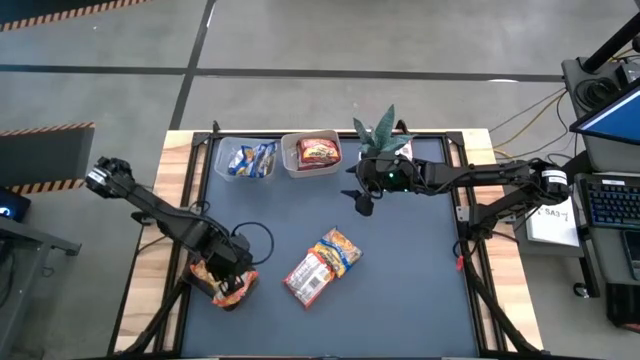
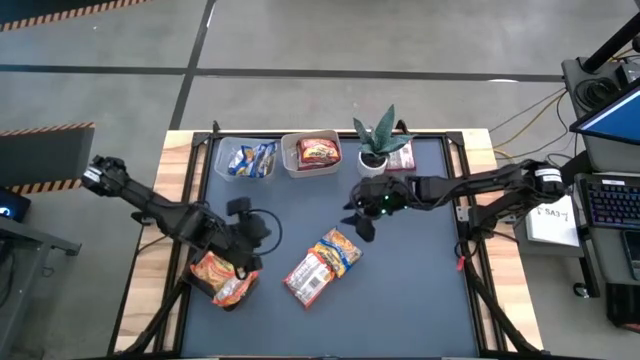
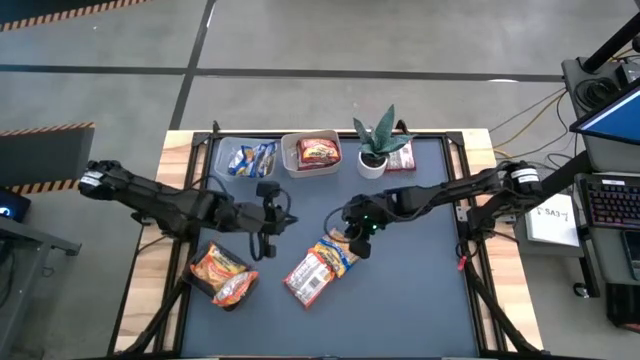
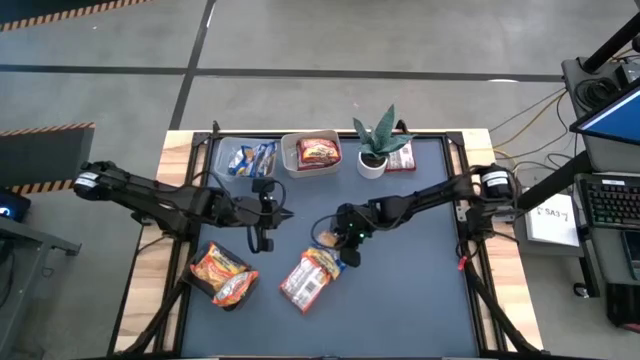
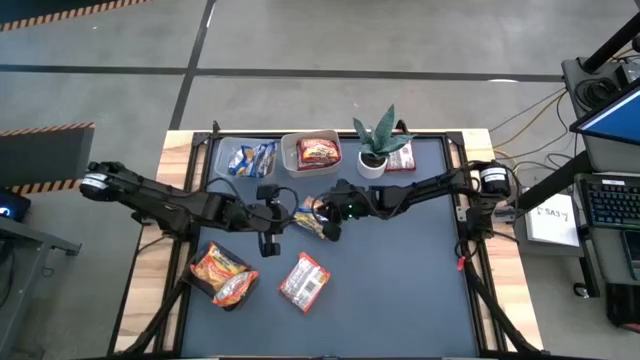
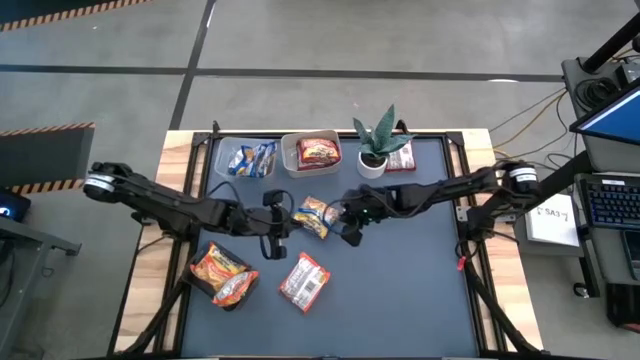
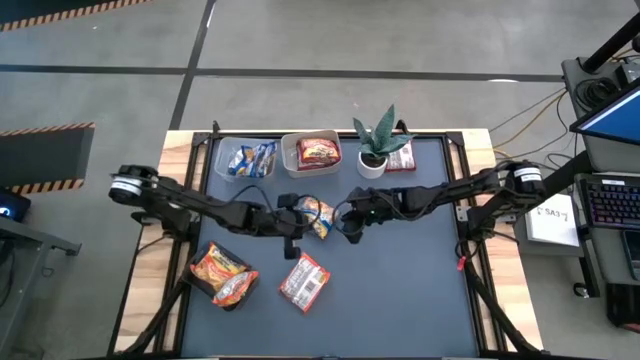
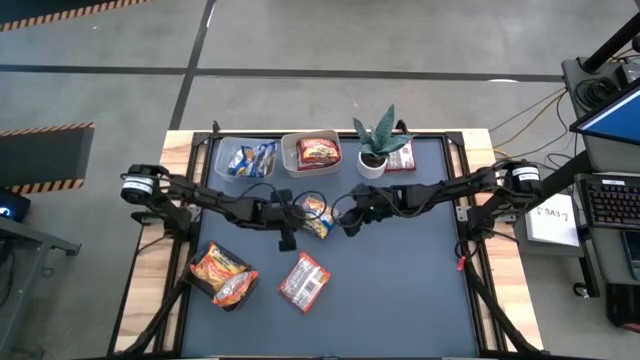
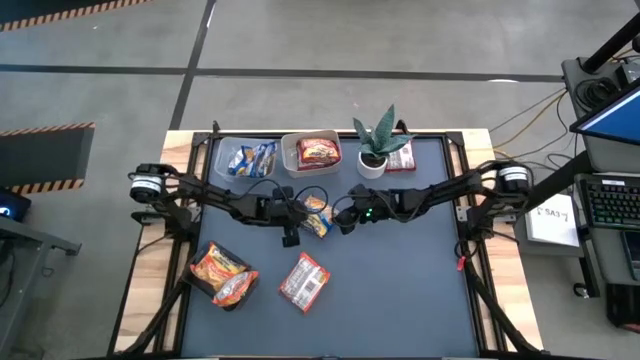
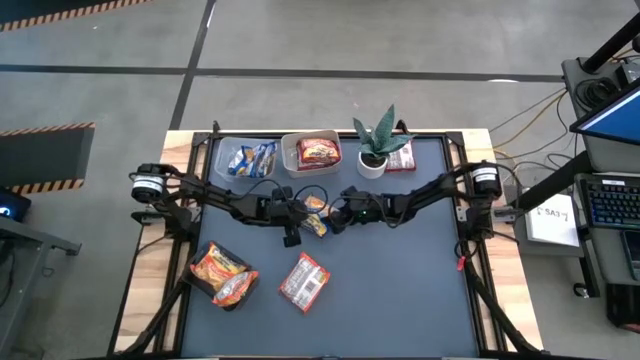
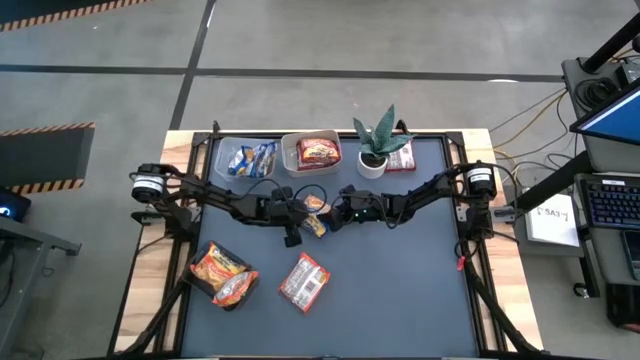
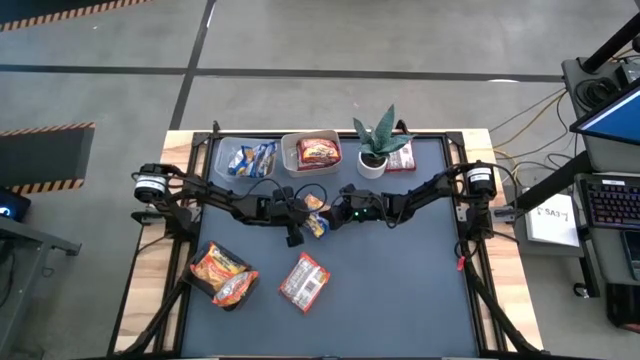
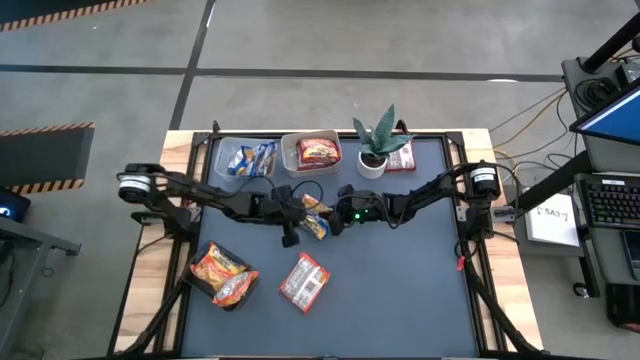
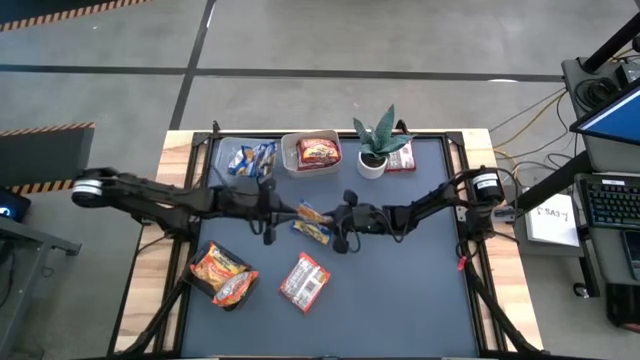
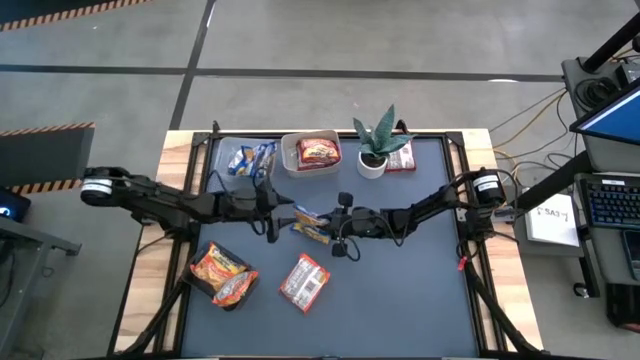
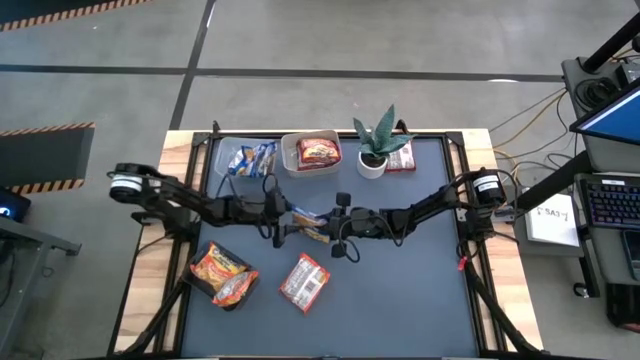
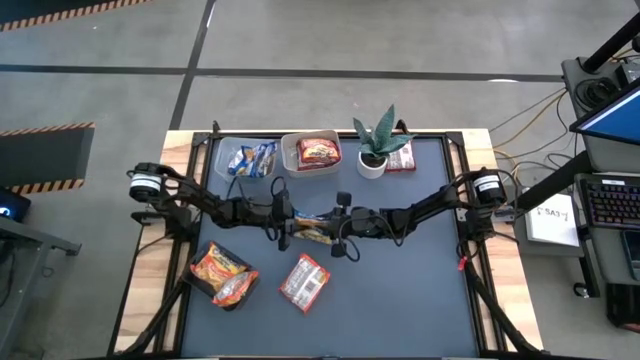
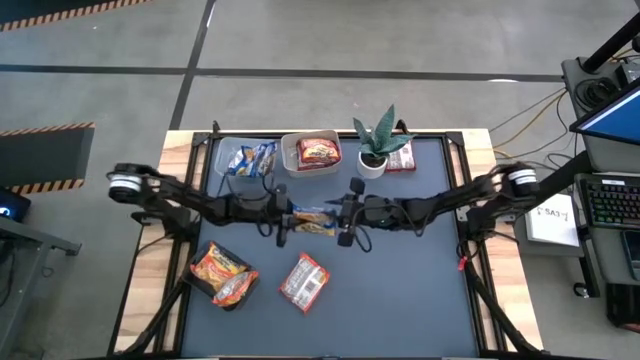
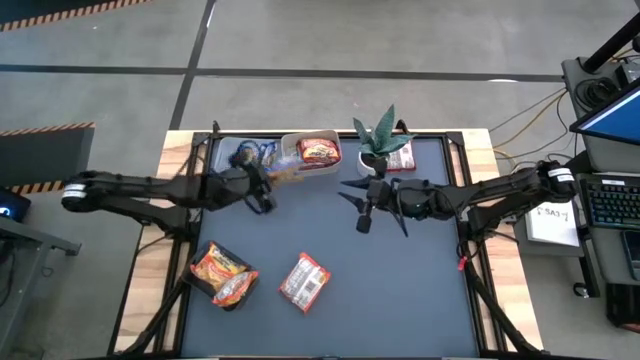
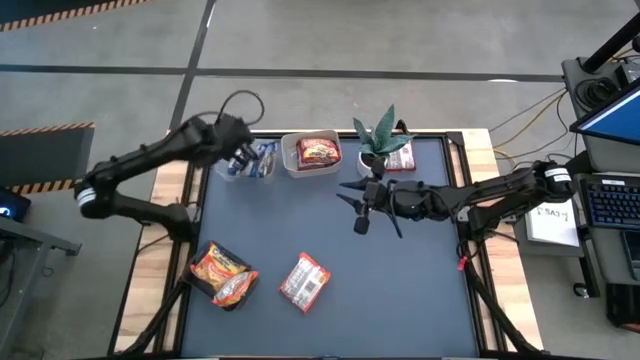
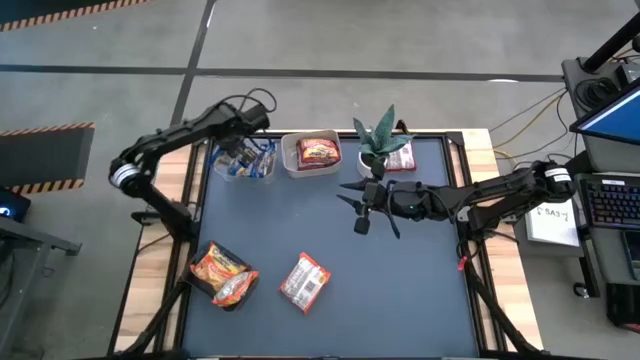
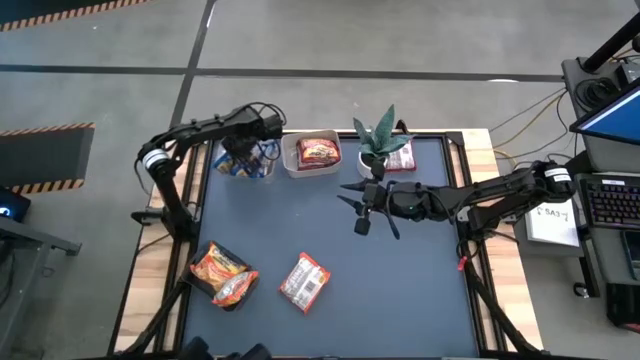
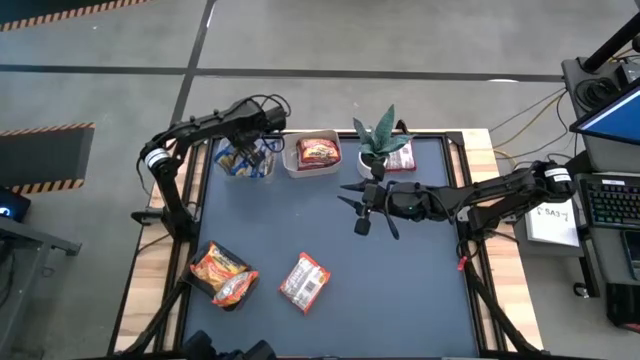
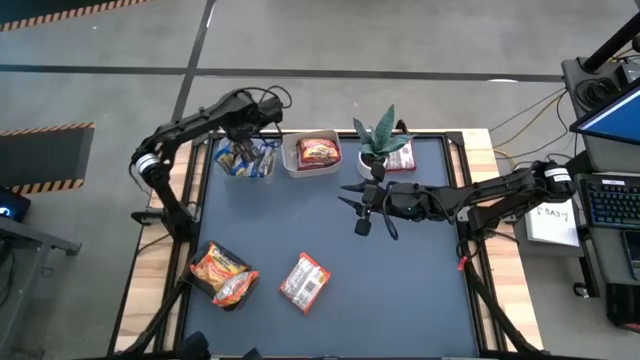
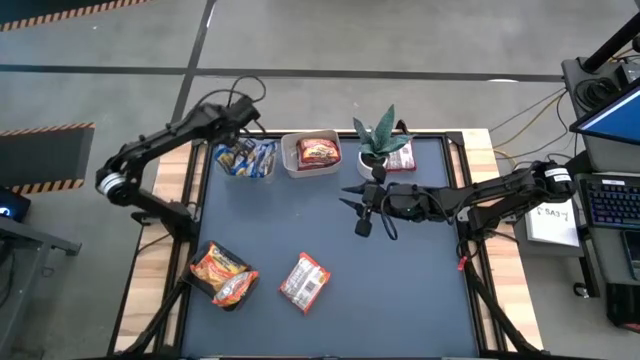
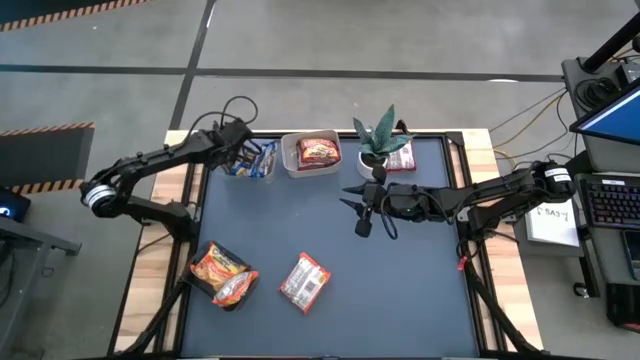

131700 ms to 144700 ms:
Task: Sort Maruchan noodles
Put the blue noodle pack into the transparent bin

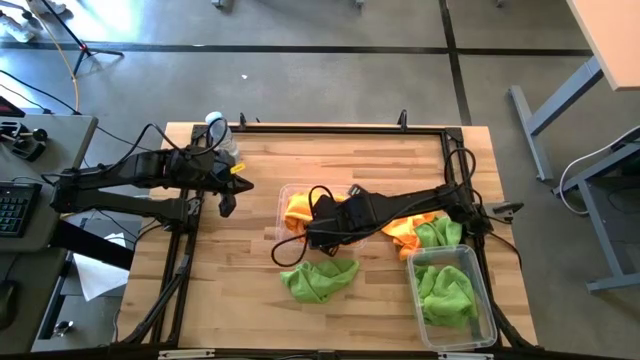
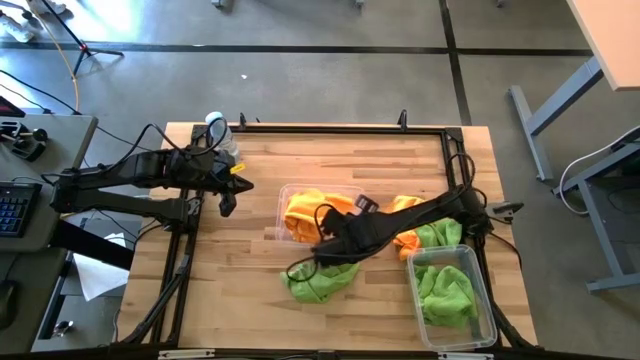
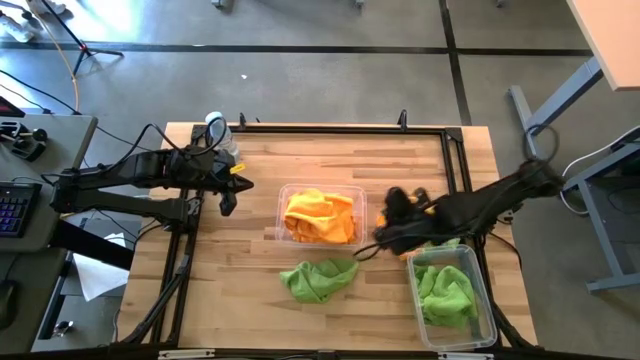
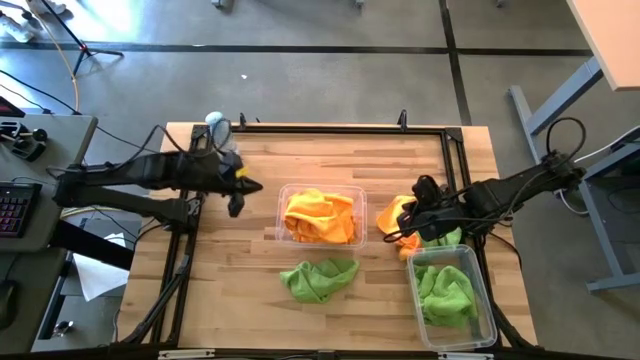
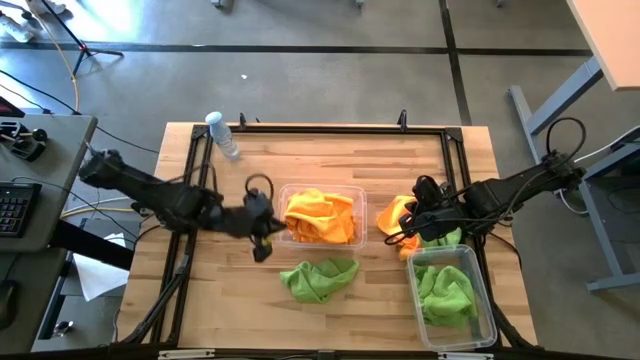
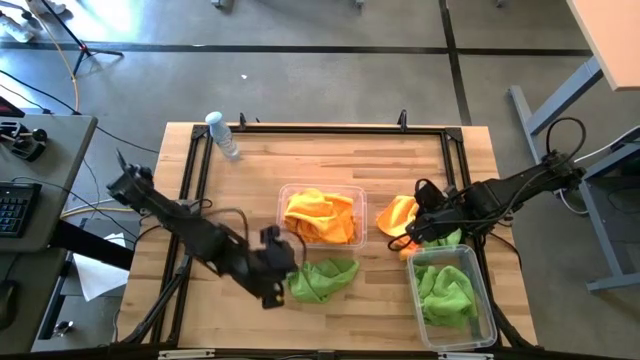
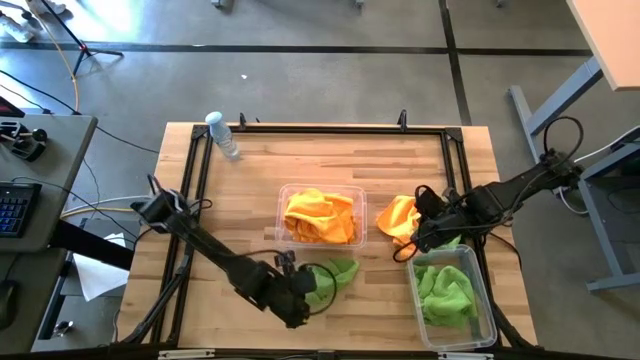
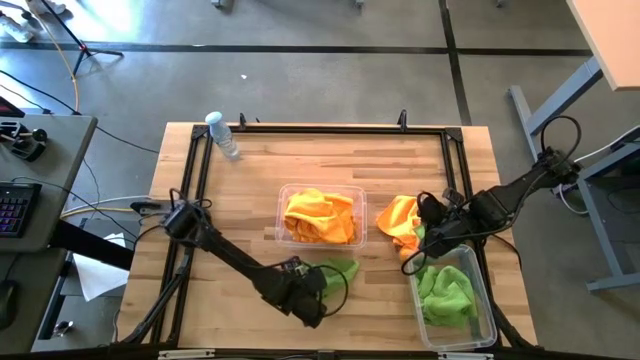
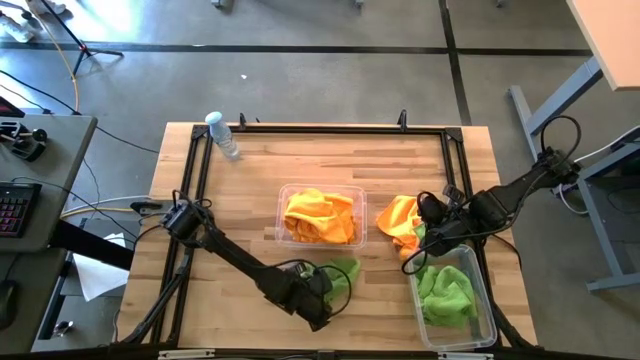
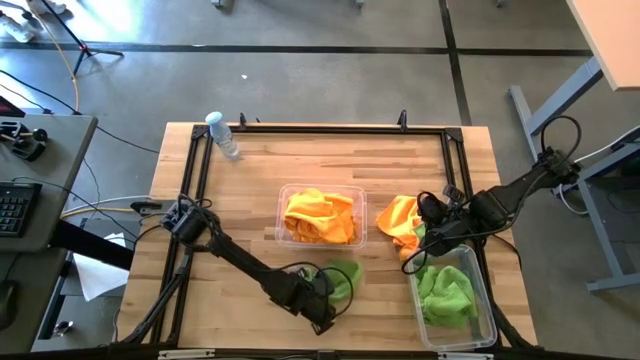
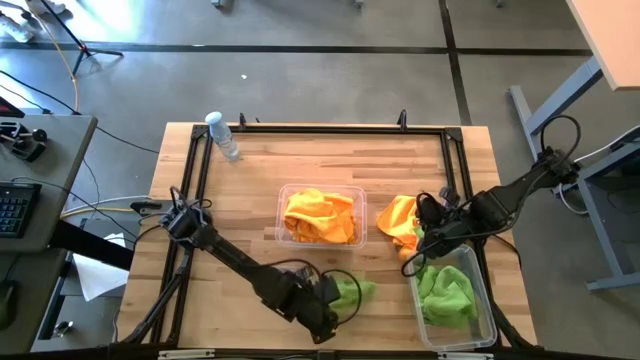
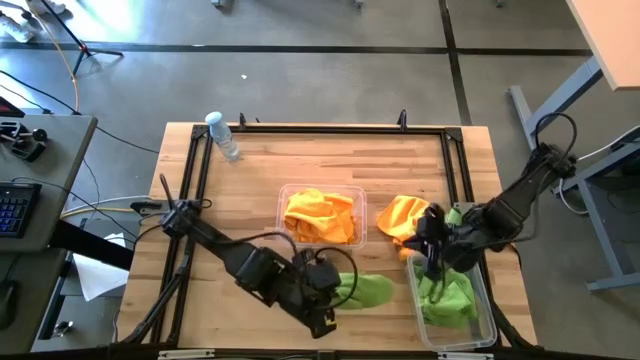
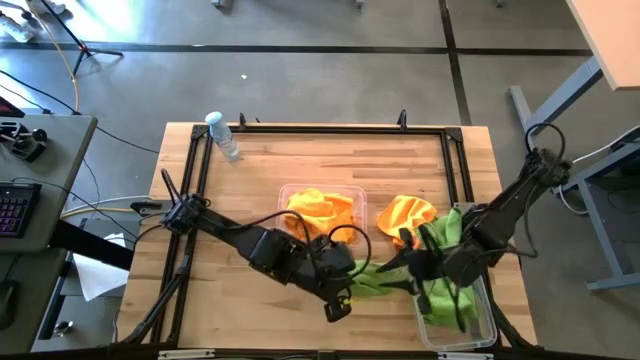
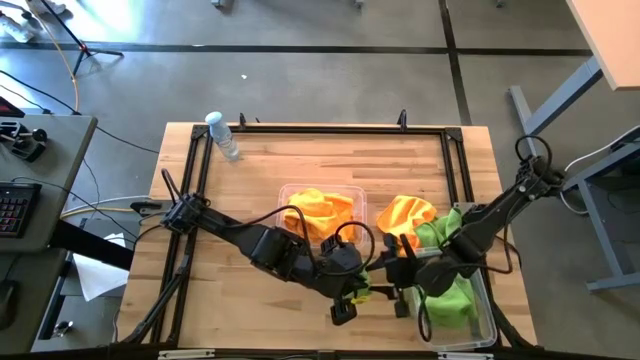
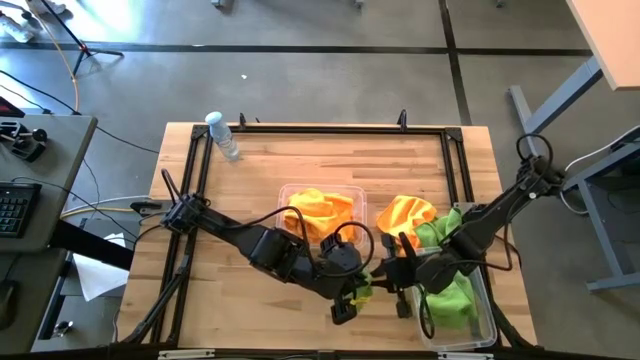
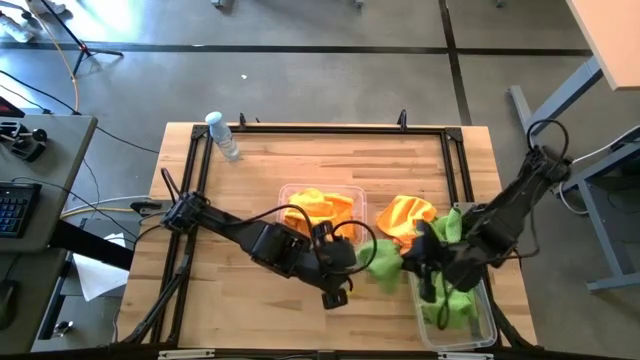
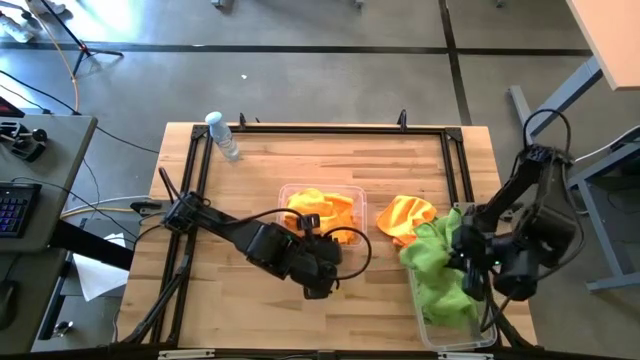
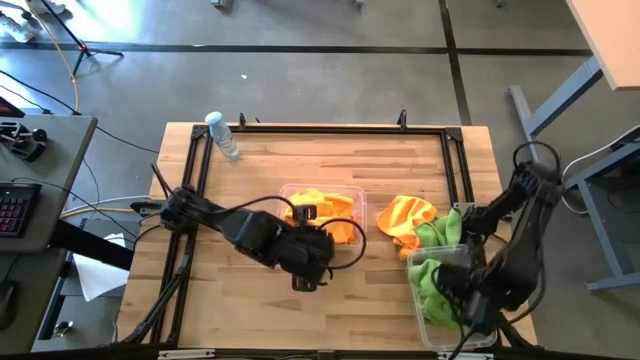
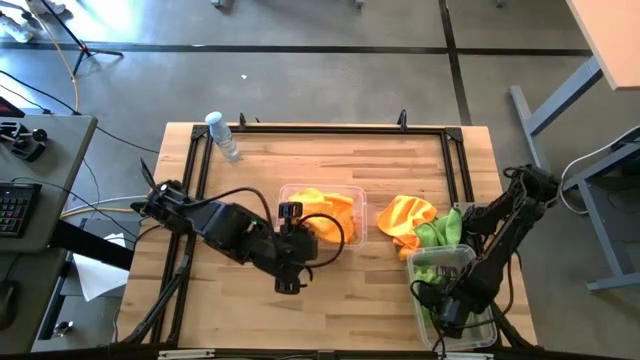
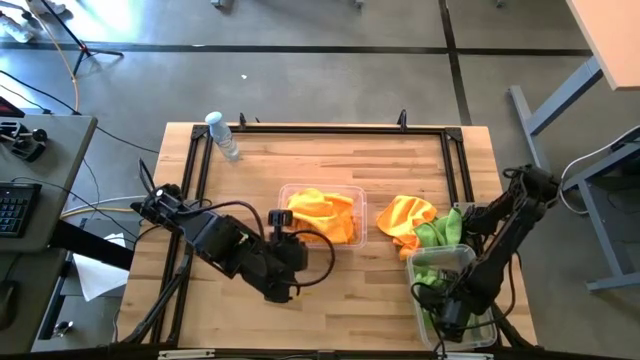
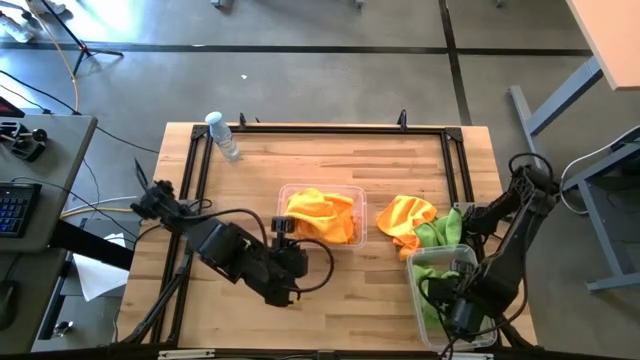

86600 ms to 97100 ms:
Task: Sort microfiber towel by color & place in baskets
Put the green towel into the bottom transparent bin
